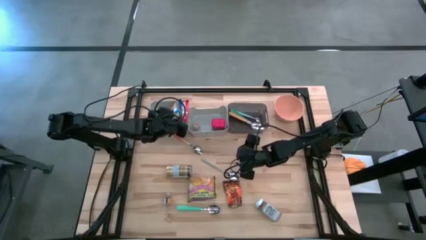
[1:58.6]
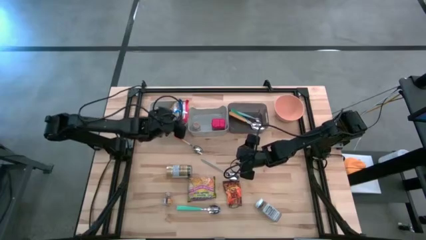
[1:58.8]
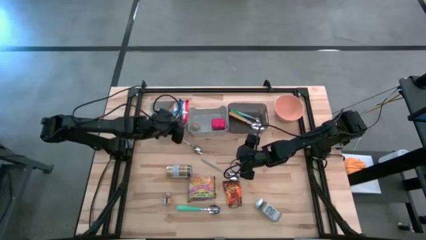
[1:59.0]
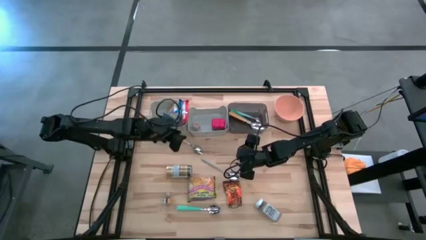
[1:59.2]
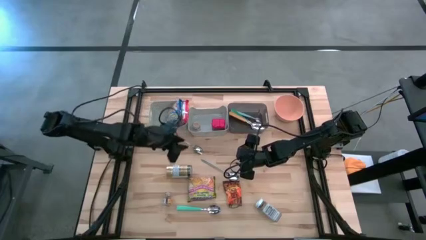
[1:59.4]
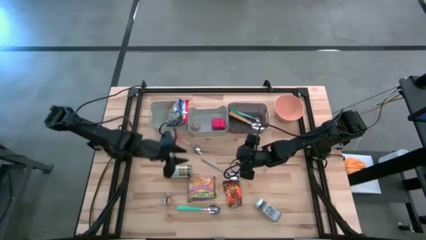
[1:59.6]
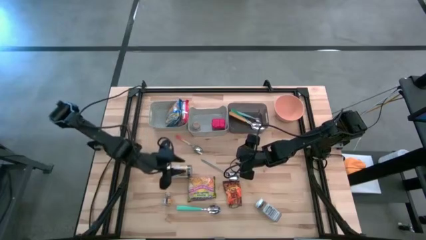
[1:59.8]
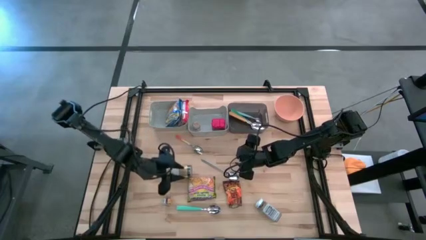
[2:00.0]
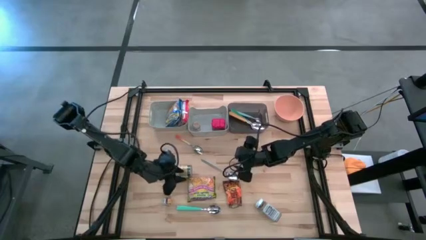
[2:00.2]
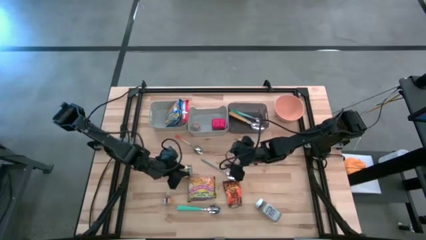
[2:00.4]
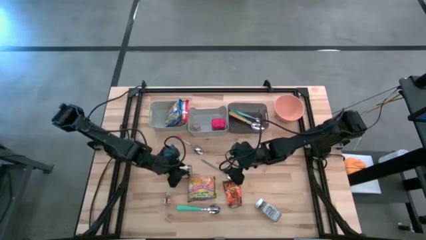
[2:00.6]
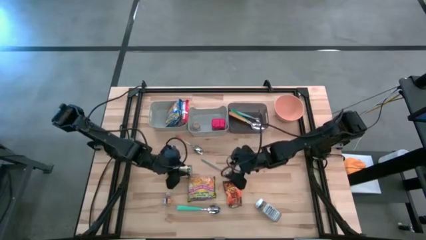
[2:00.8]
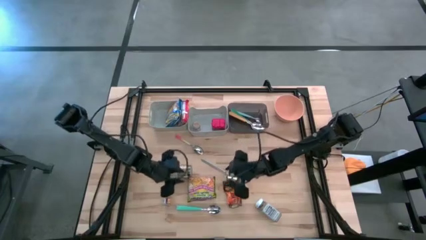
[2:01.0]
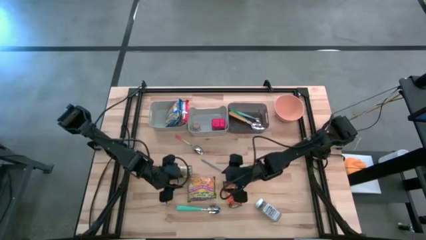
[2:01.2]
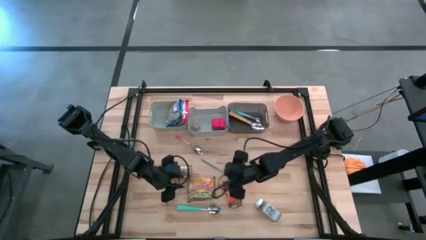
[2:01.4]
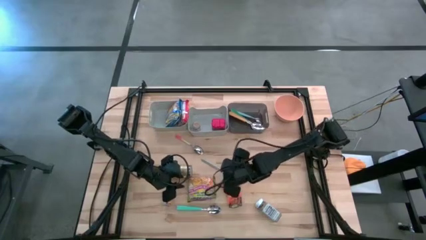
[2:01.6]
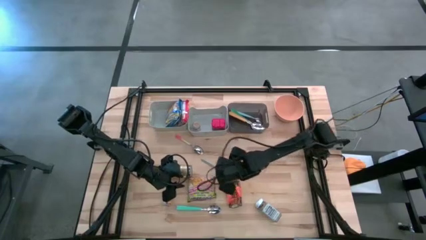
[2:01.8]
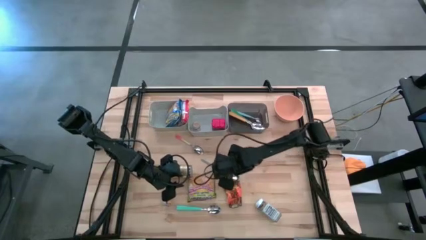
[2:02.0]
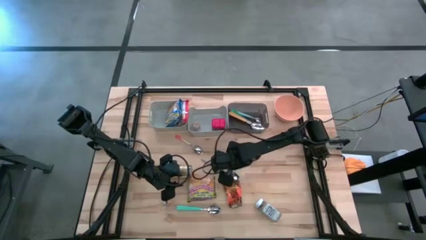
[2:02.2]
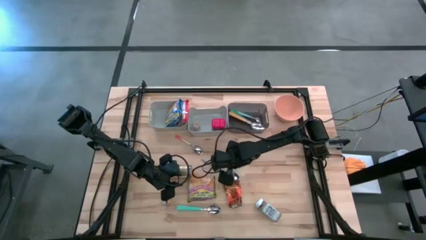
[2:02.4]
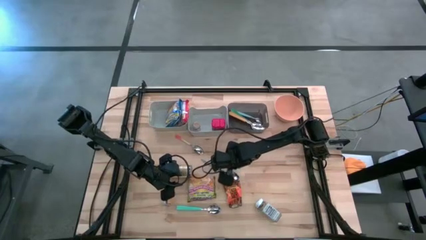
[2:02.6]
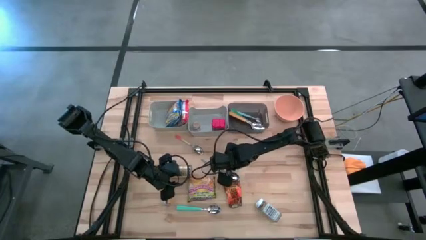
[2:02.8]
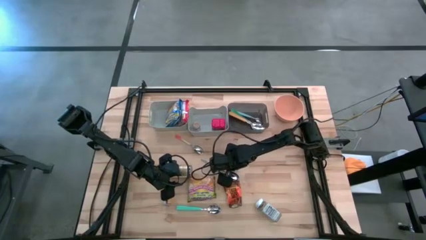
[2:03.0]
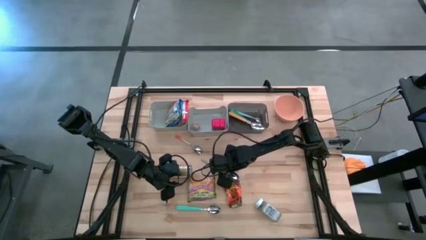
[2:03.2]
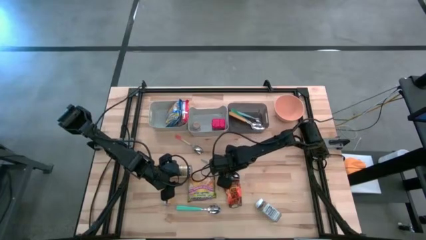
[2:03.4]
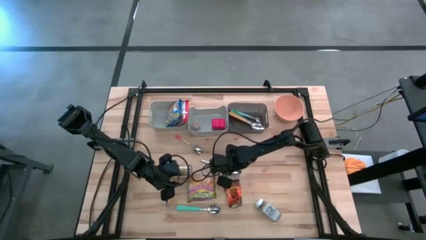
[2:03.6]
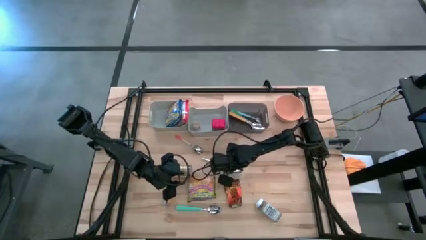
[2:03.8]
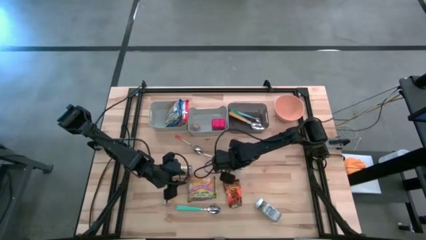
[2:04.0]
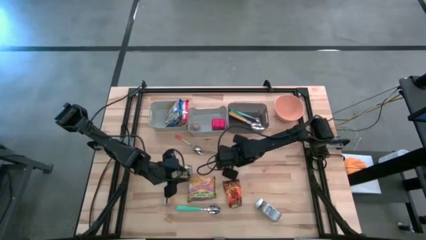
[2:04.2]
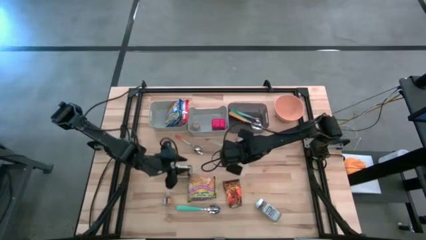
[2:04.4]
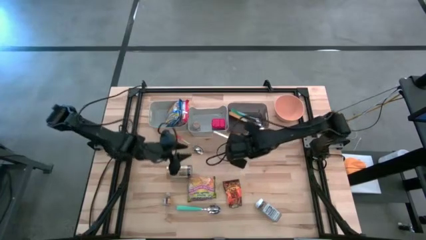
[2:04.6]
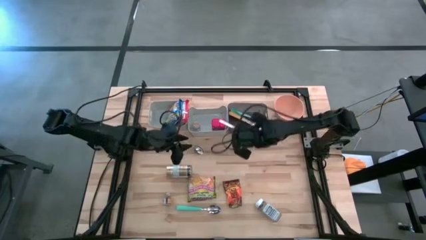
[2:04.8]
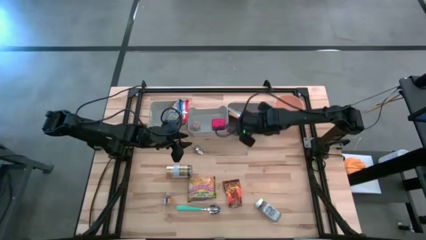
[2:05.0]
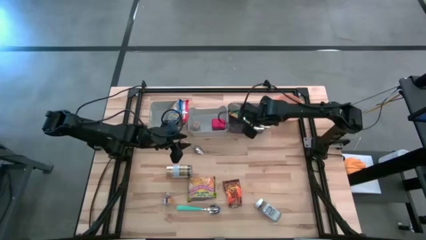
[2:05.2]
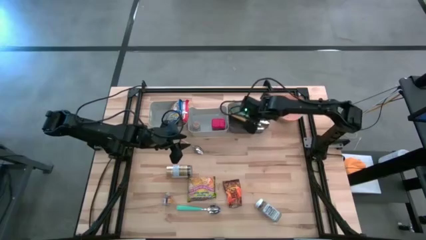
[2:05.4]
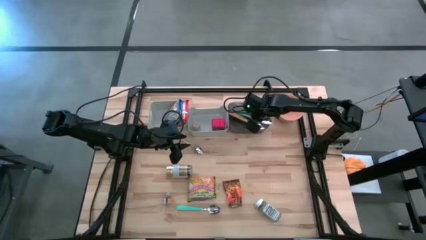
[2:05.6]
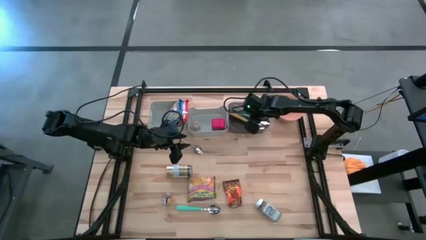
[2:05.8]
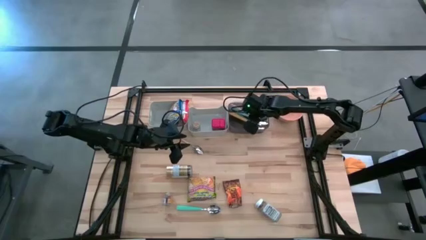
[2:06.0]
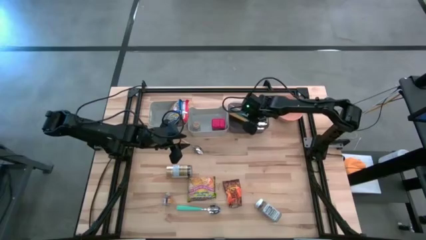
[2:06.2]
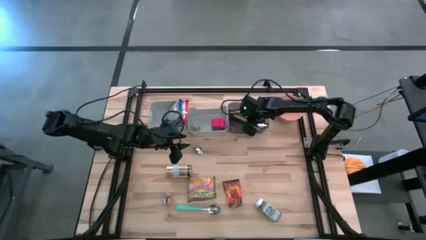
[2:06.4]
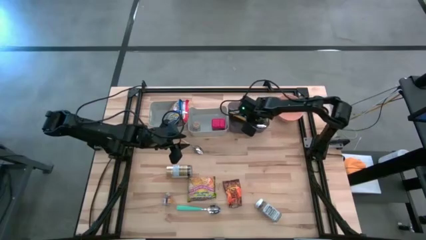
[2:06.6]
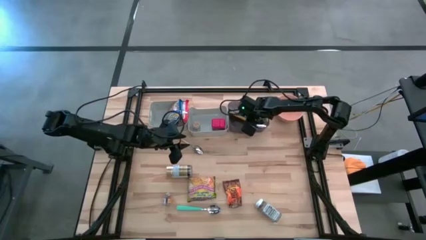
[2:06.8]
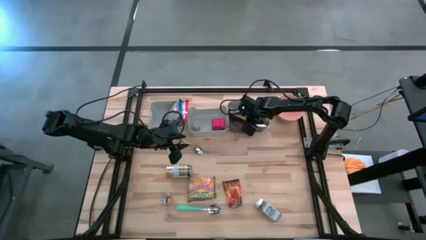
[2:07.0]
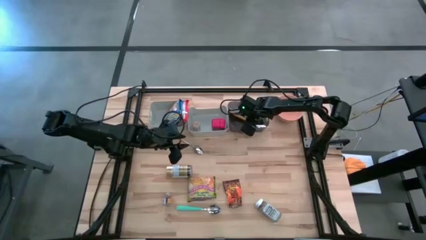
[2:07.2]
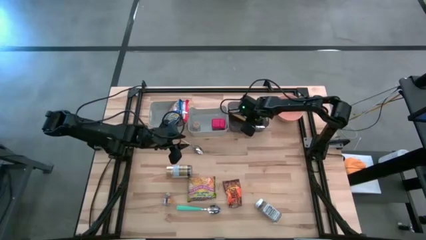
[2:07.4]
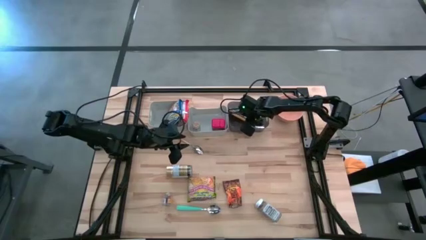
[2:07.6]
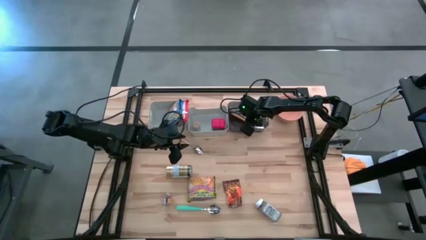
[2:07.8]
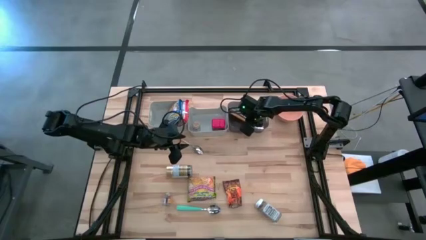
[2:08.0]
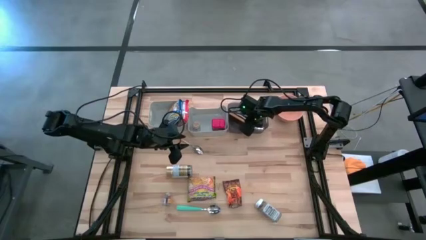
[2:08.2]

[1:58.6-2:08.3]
Put the silver spoon into the black bin
